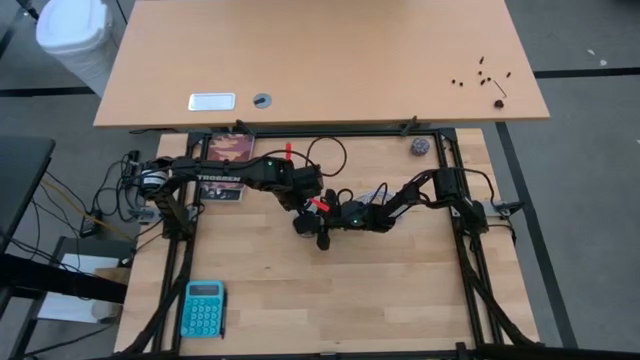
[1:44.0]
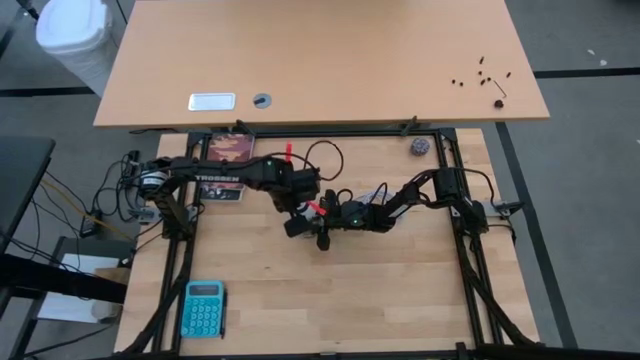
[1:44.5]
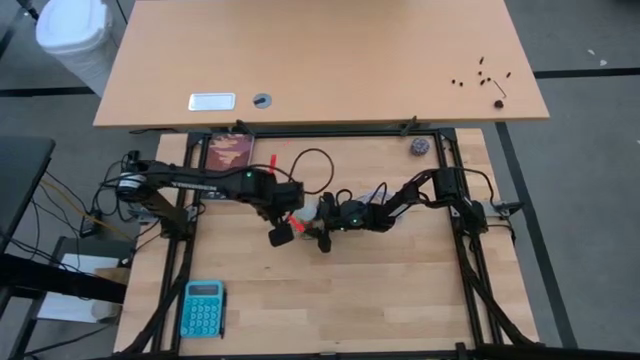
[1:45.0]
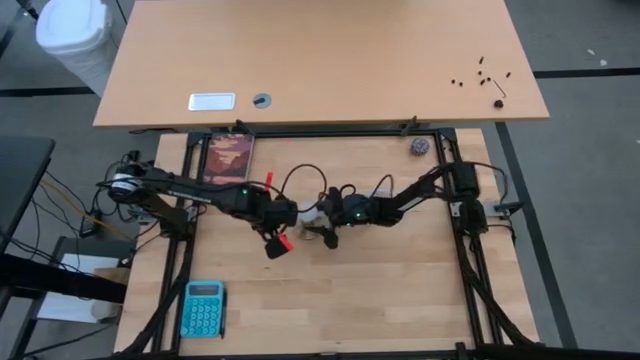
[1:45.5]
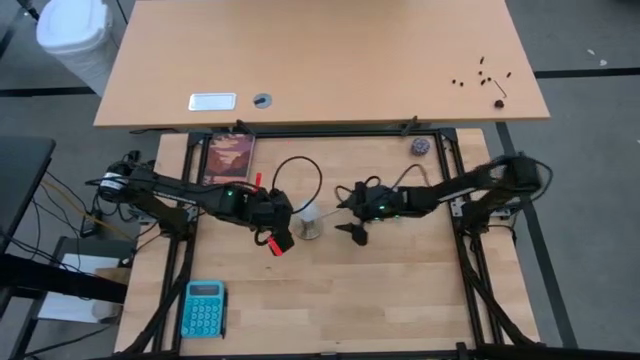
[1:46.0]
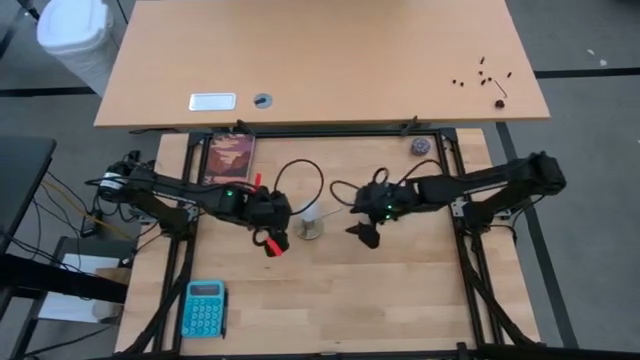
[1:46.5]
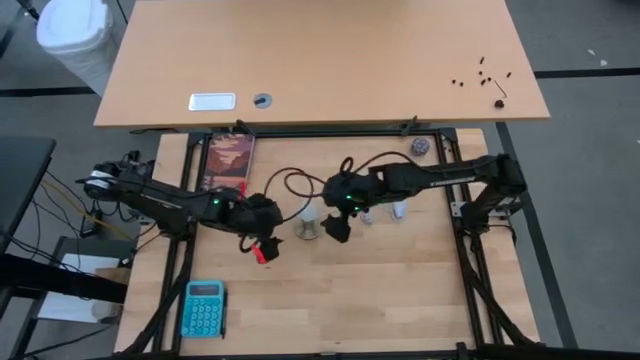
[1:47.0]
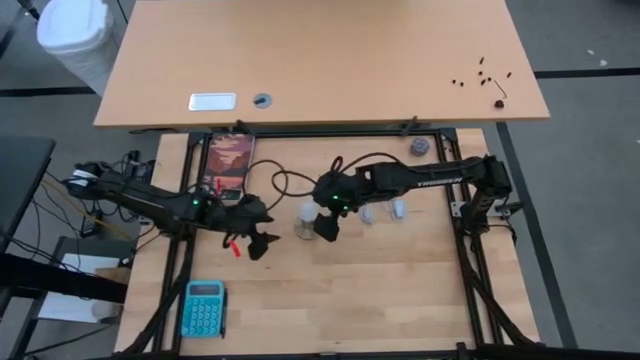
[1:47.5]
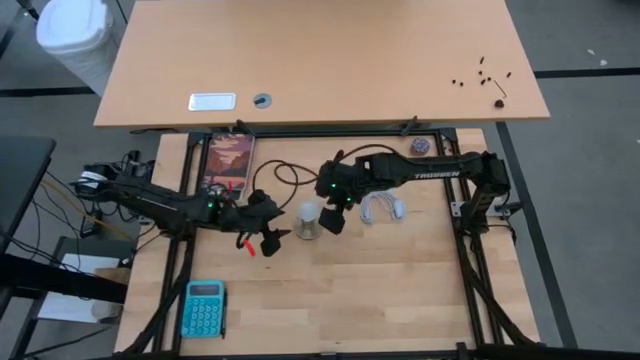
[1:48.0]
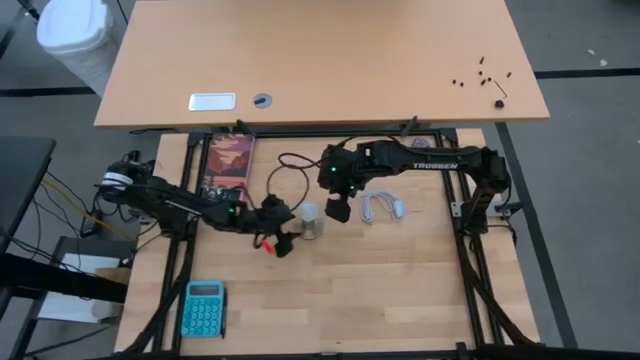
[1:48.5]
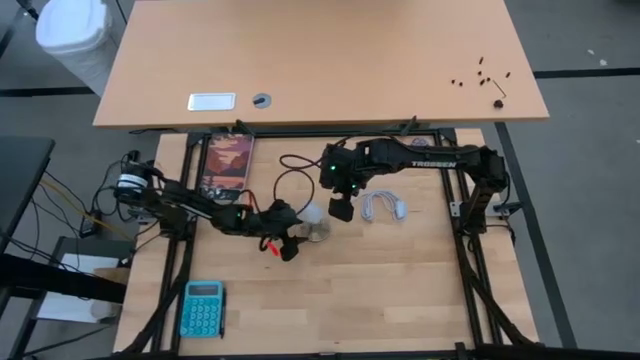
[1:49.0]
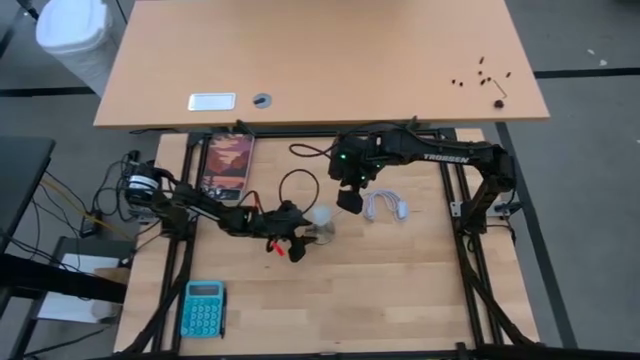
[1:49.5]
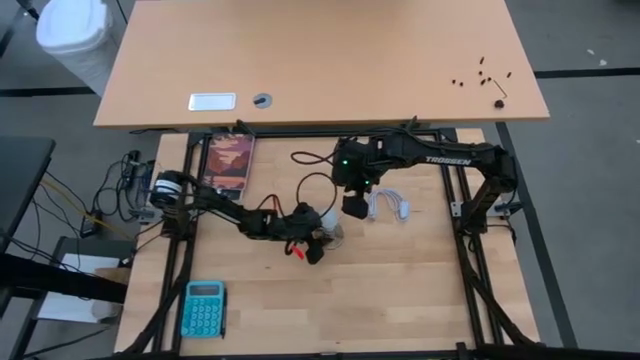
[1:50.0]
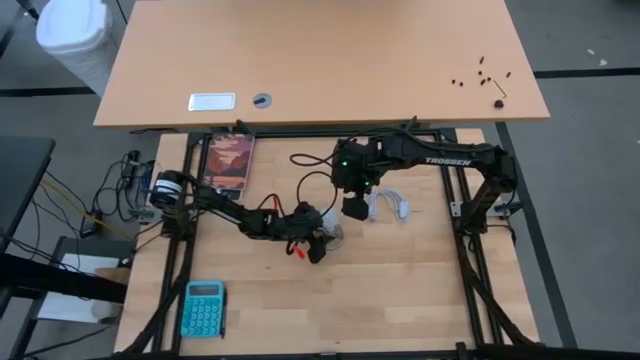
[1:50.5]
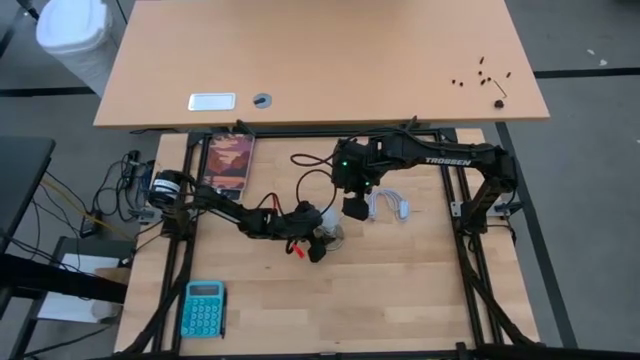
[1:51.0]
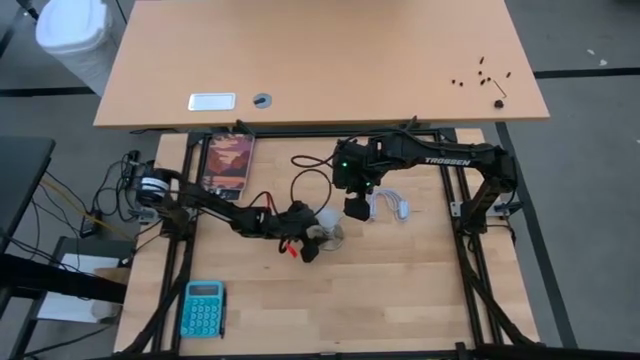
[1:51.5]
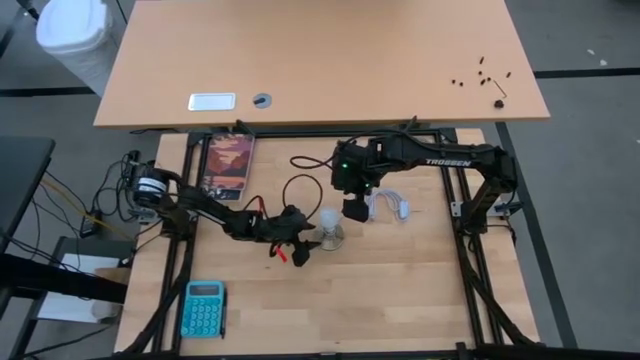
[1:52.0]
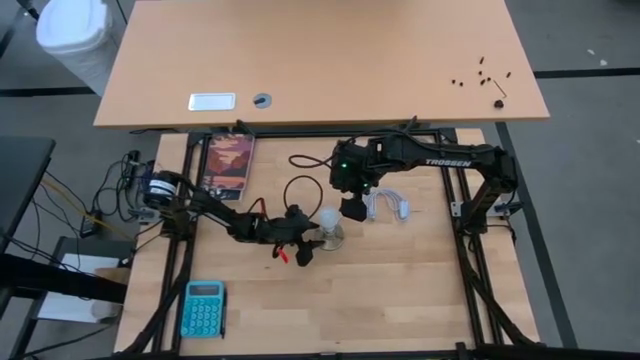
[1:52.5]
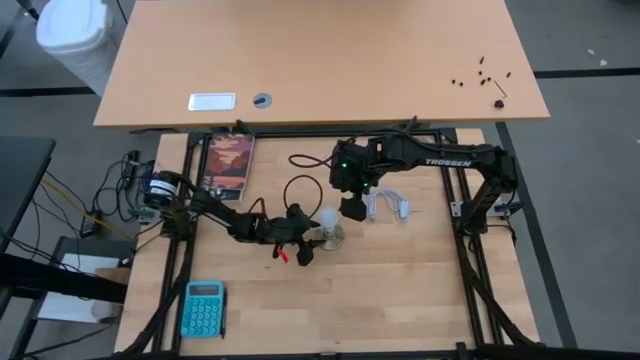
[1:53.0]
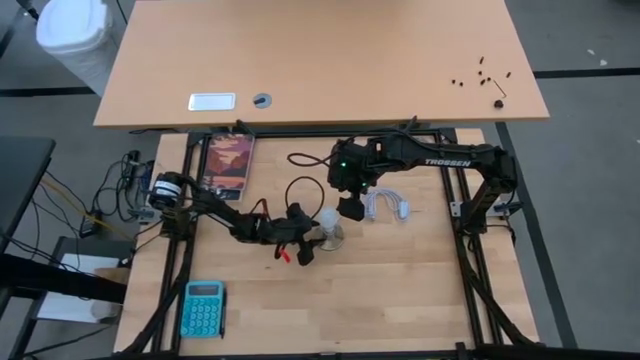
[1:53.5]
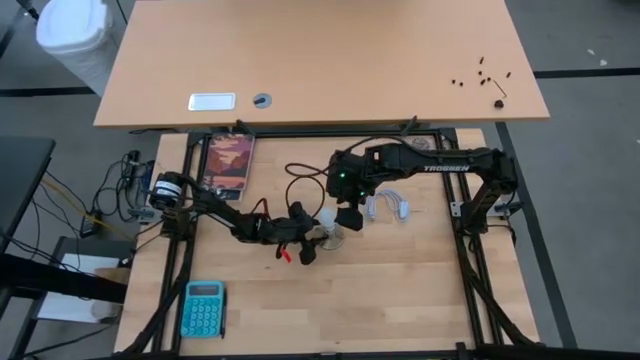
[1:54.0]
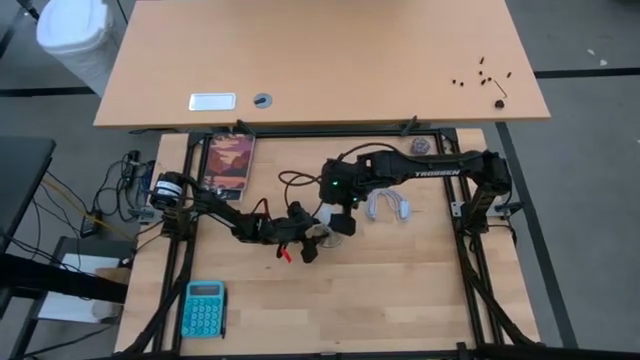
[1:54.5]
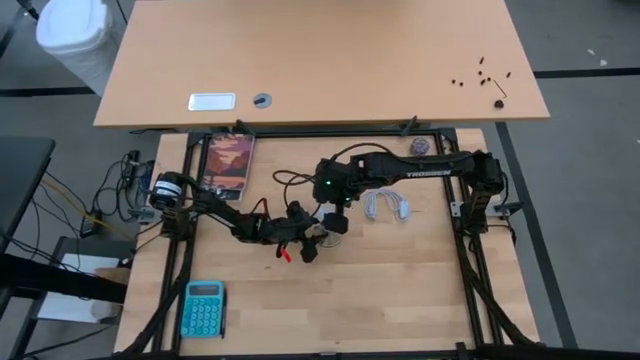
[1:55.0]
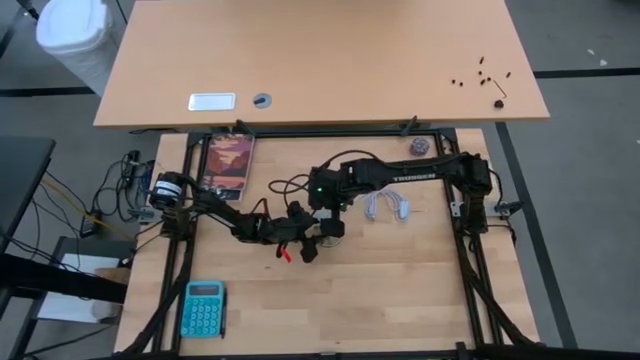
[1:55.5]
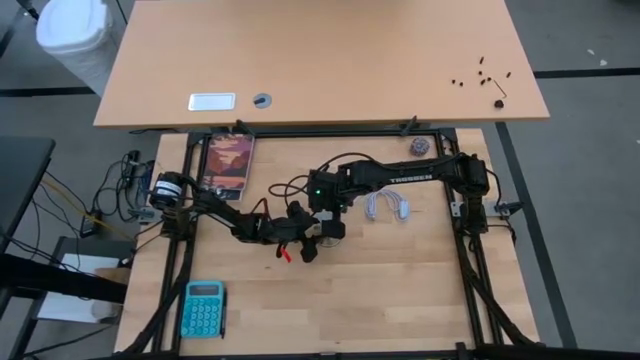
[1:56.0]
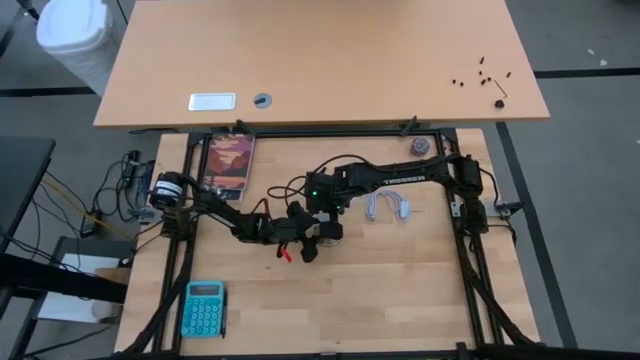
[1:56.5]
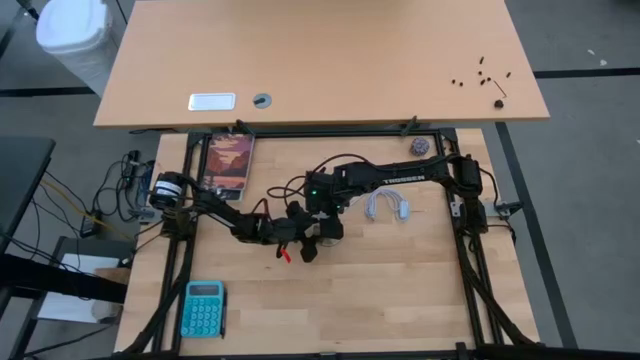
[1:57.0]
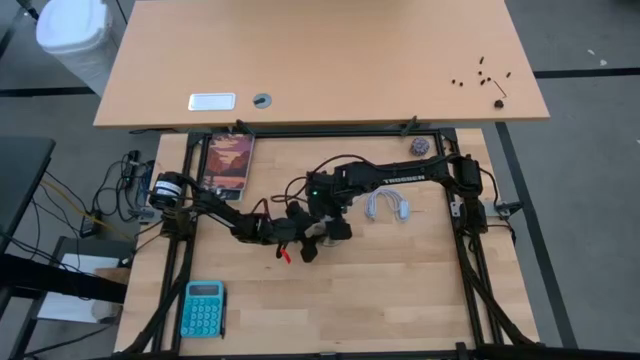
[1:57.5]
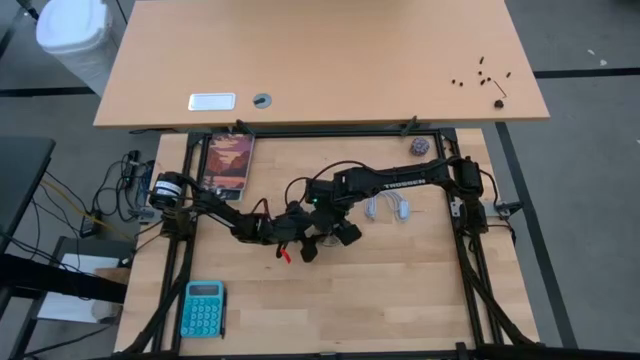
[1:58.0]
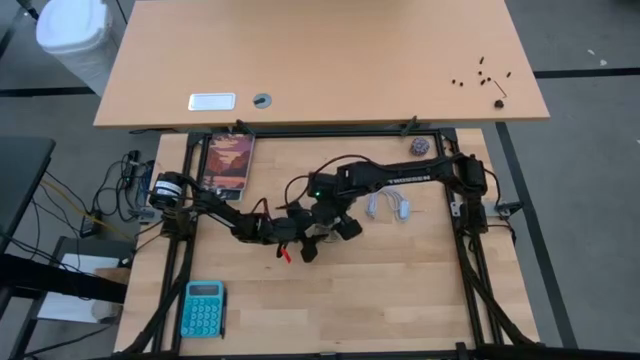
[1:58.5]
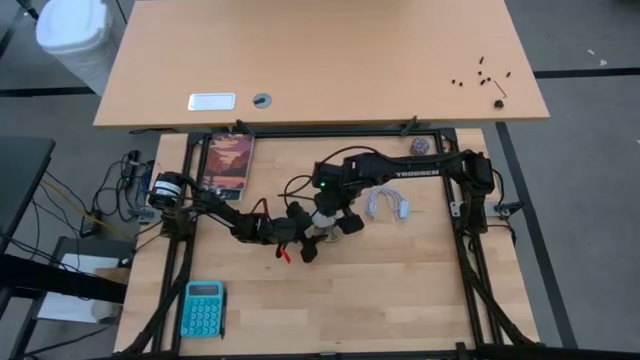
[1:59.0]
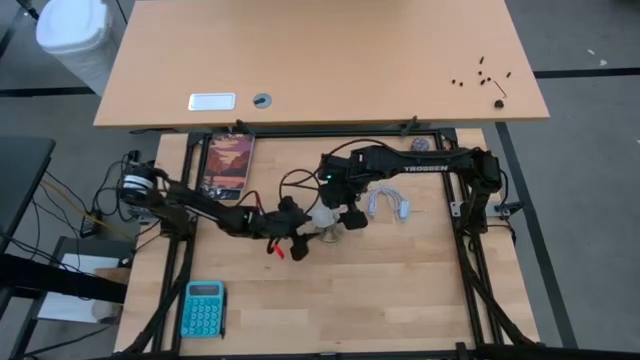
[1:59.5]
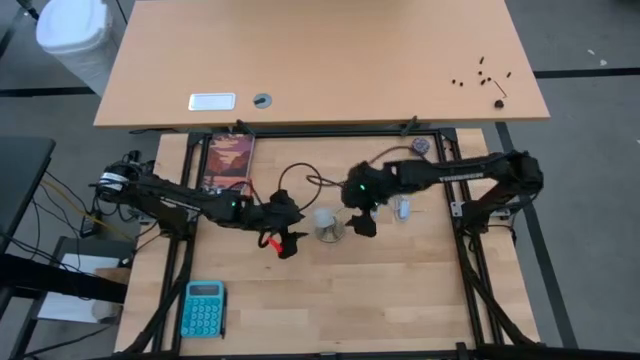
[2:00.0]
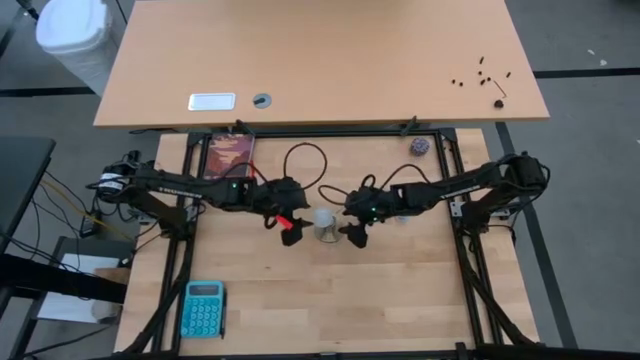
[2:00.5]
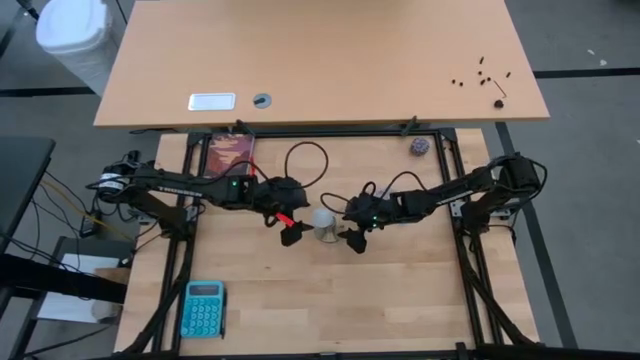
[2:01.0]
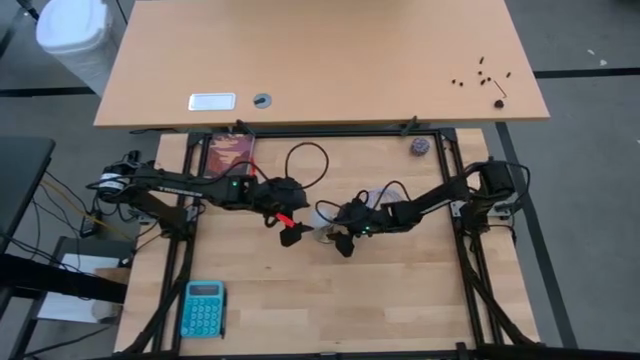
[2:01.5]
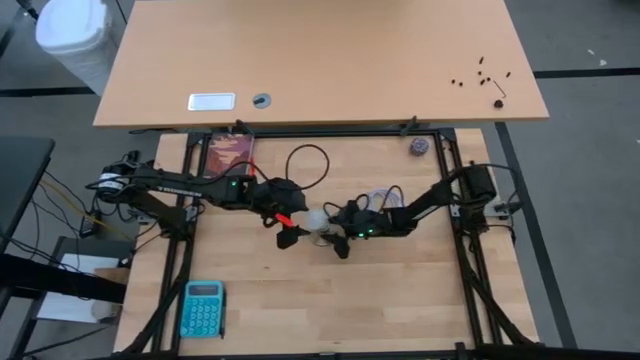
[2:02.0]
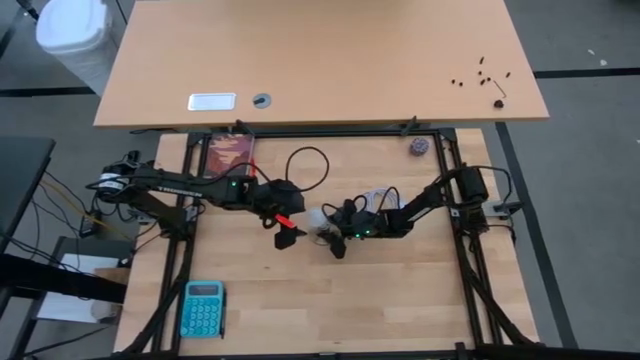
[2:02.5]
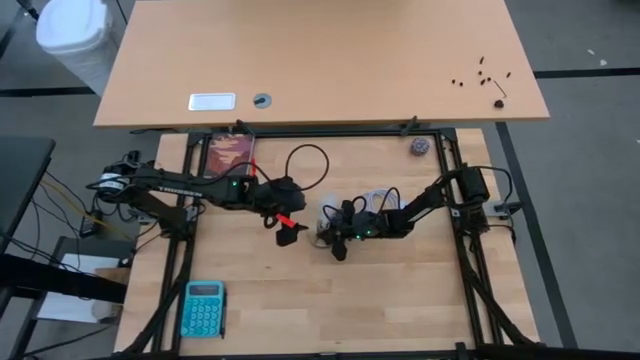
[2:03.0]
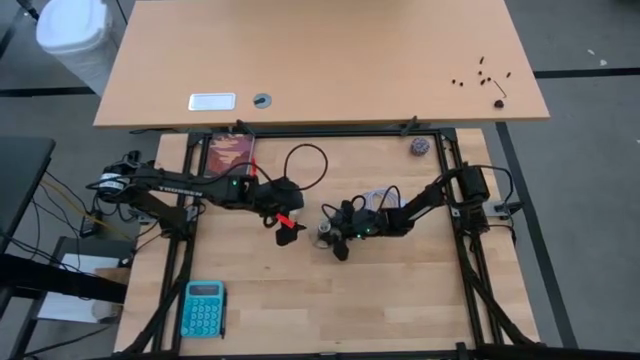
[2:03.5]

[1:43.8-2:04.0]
Task: Screw lightbulb
Insert the lightbulb into the desk lamp
